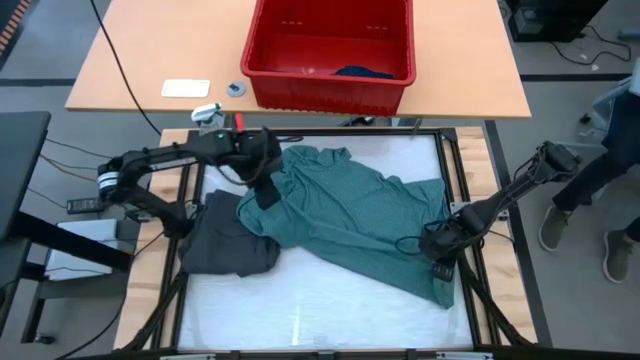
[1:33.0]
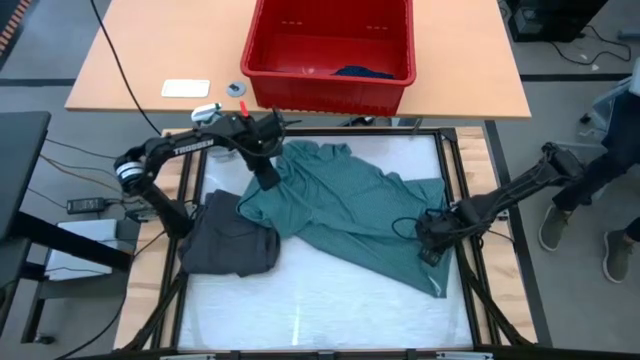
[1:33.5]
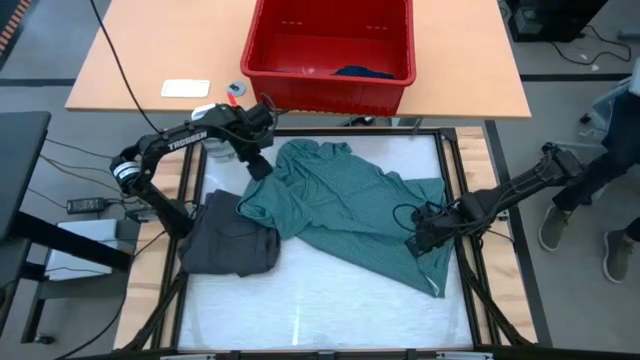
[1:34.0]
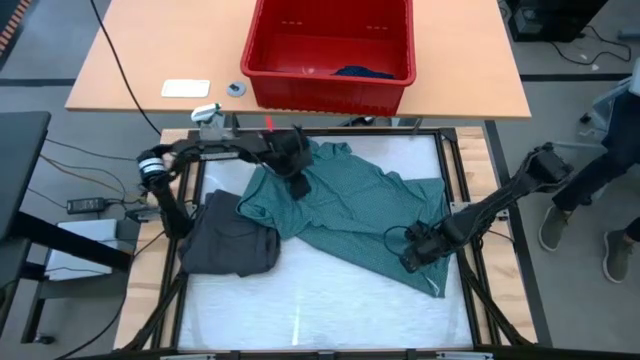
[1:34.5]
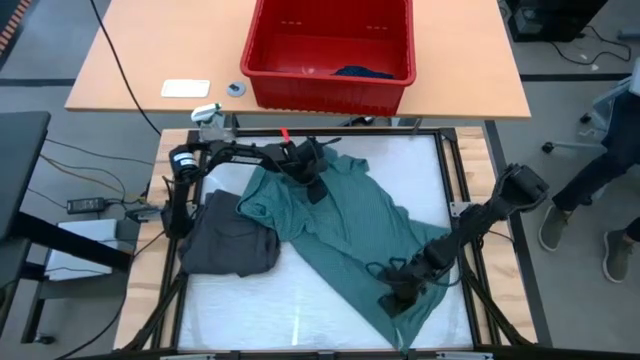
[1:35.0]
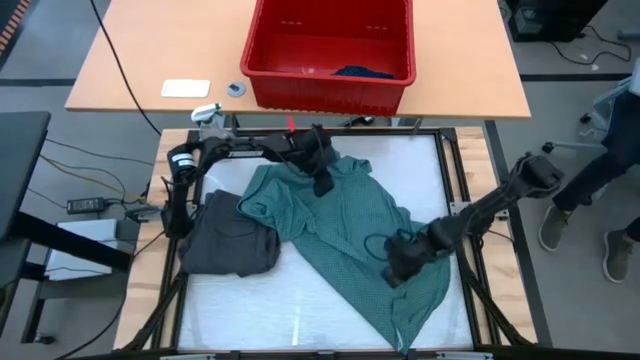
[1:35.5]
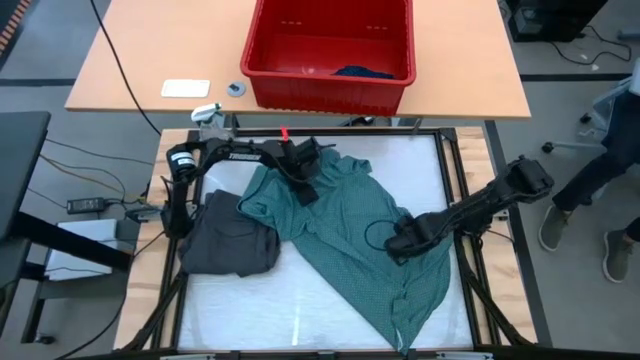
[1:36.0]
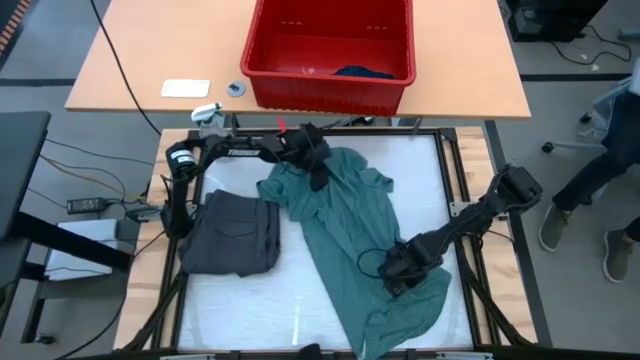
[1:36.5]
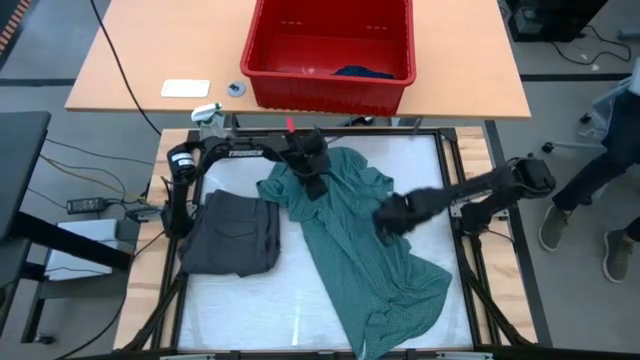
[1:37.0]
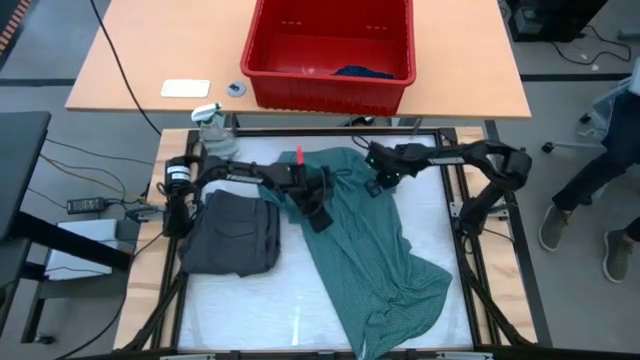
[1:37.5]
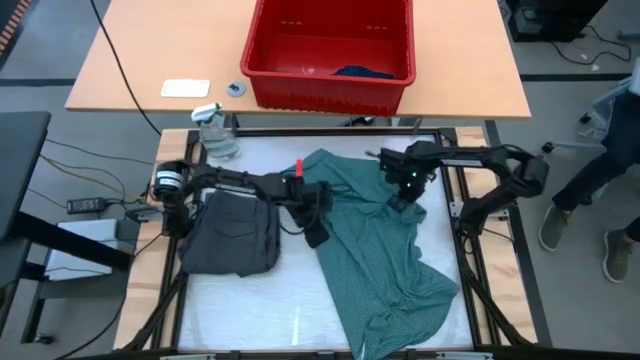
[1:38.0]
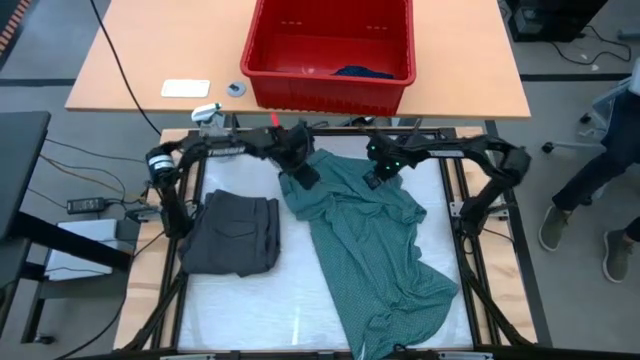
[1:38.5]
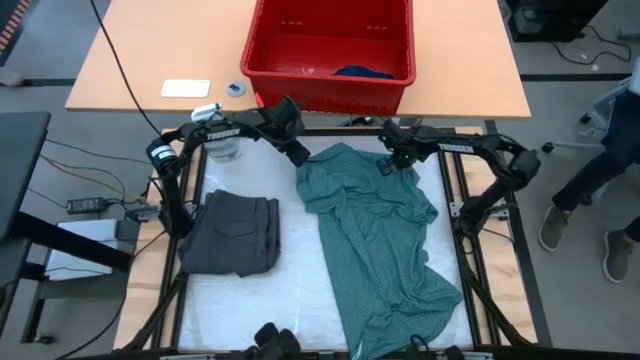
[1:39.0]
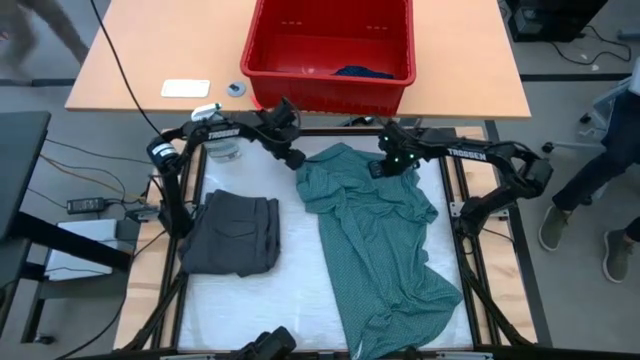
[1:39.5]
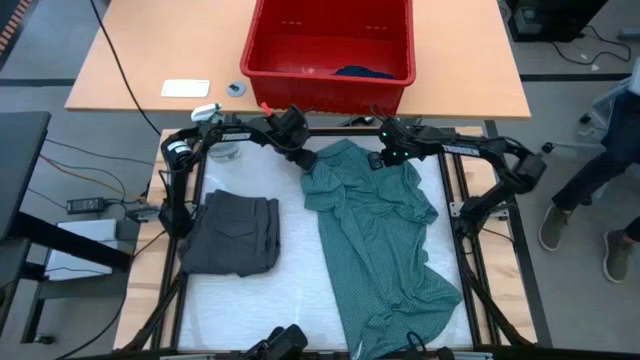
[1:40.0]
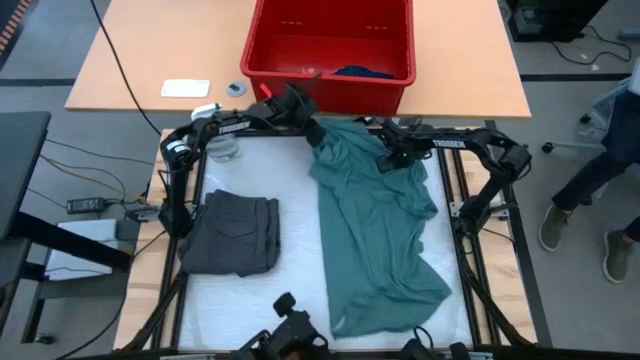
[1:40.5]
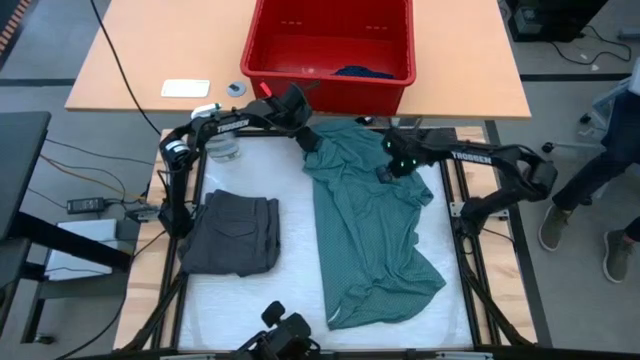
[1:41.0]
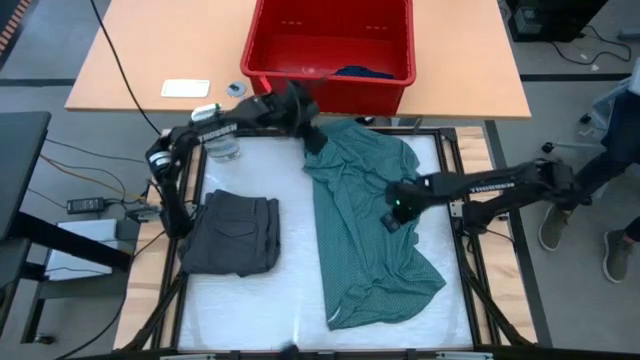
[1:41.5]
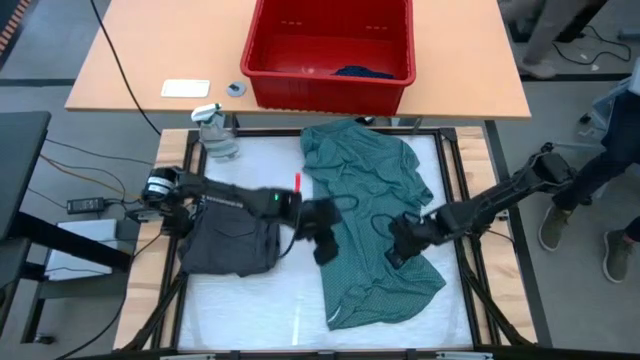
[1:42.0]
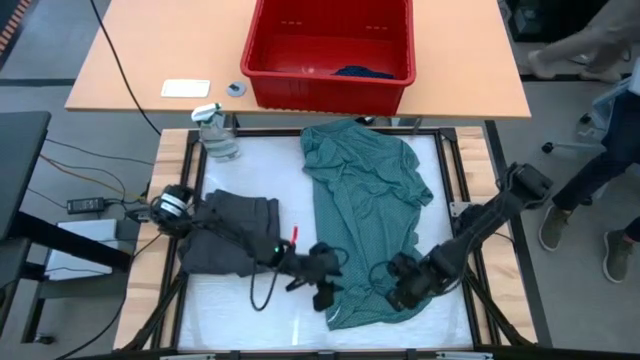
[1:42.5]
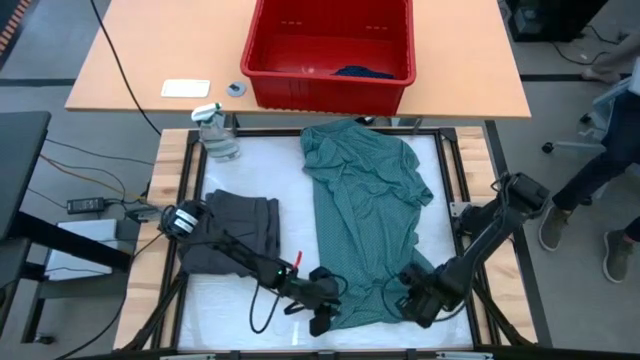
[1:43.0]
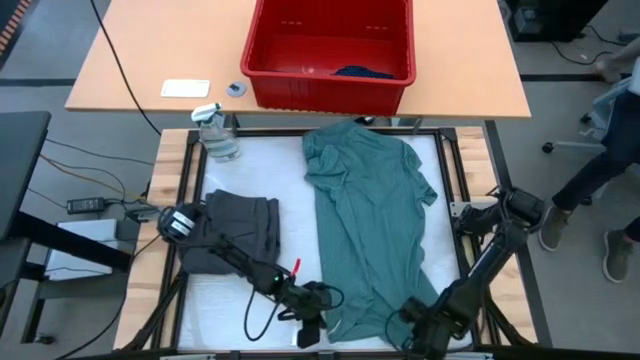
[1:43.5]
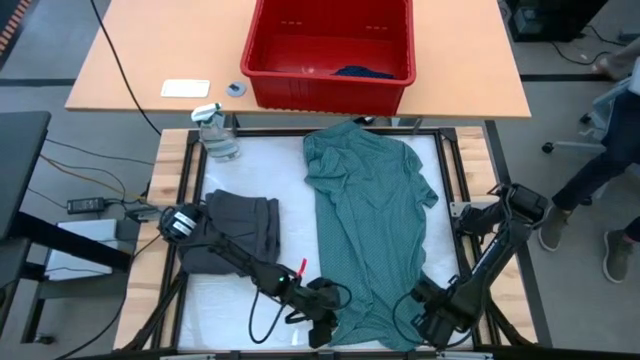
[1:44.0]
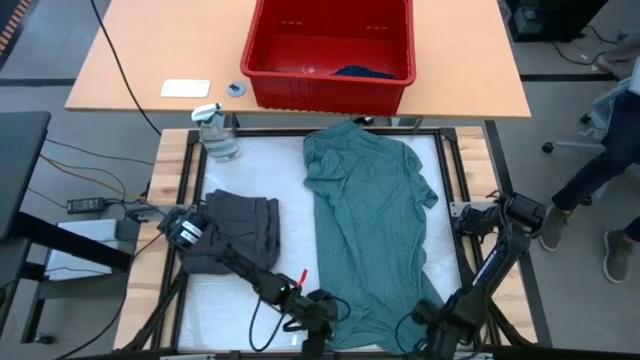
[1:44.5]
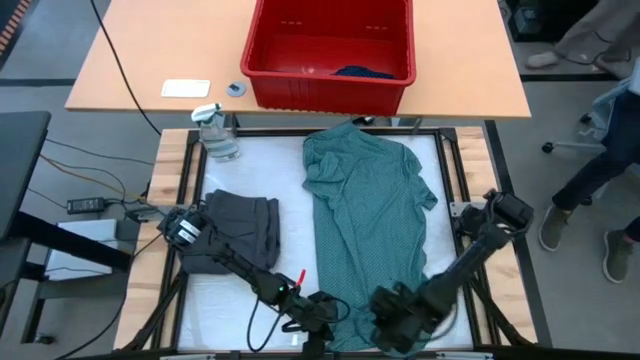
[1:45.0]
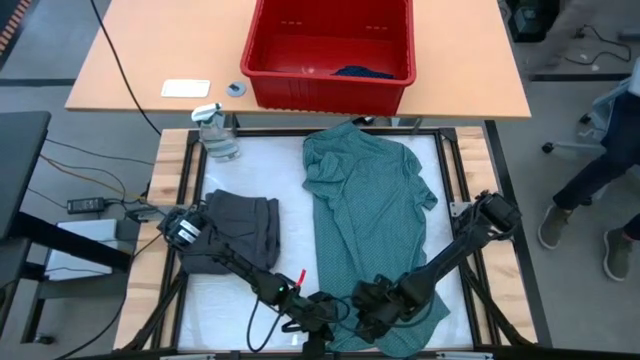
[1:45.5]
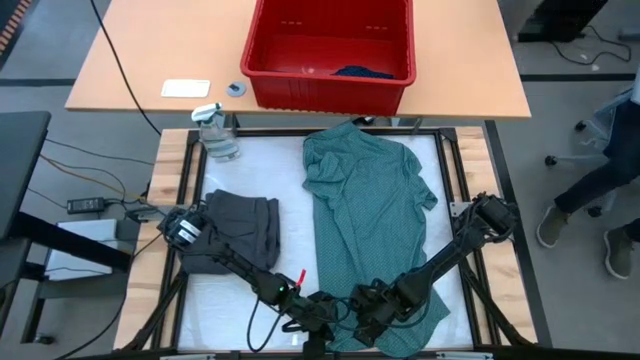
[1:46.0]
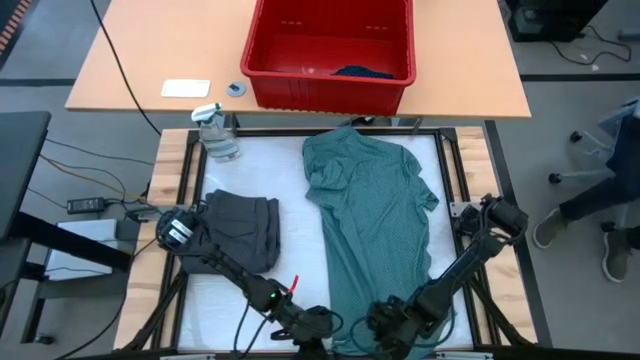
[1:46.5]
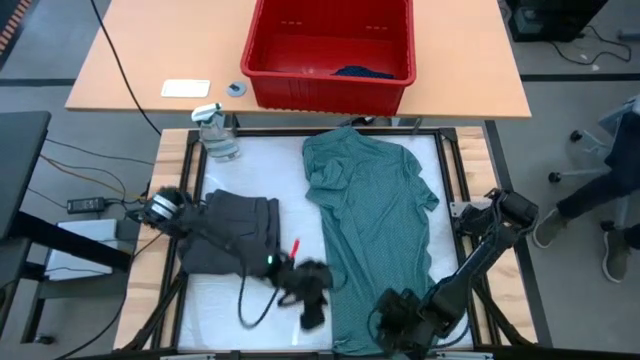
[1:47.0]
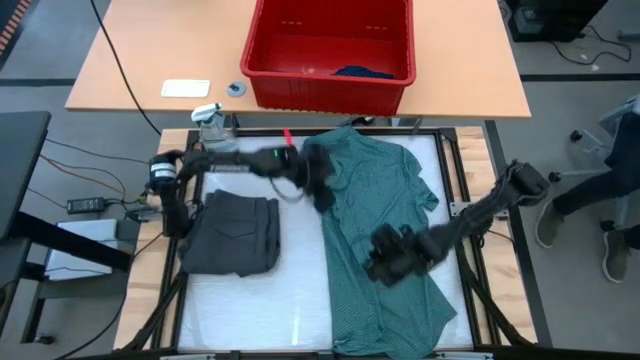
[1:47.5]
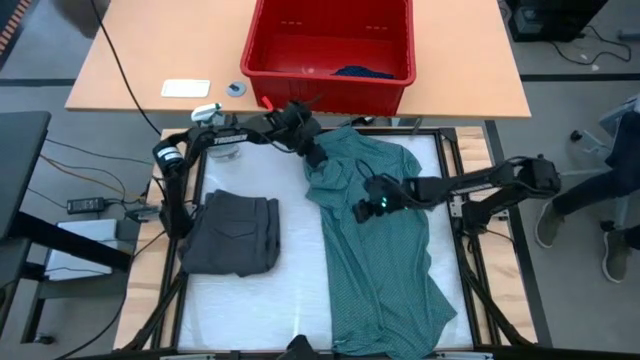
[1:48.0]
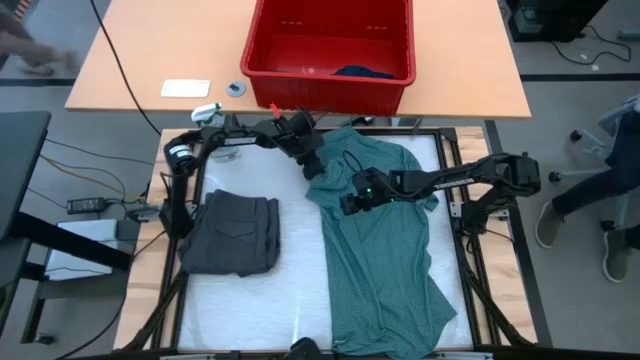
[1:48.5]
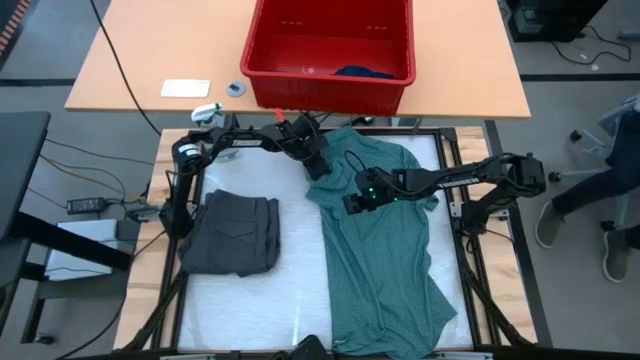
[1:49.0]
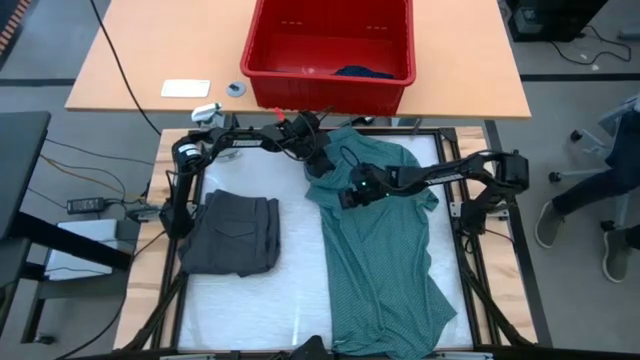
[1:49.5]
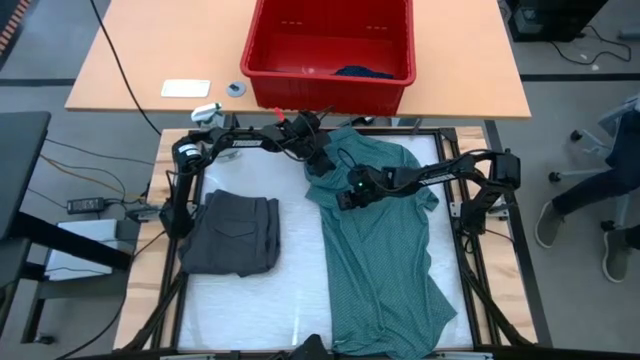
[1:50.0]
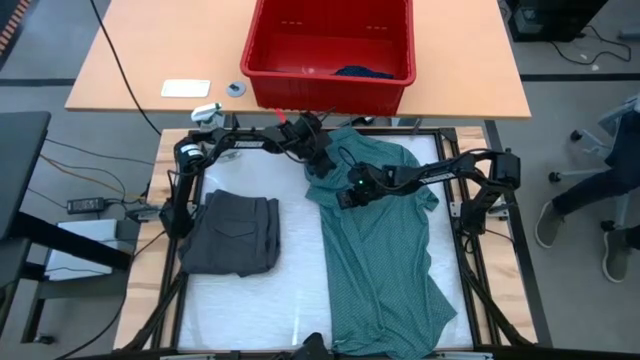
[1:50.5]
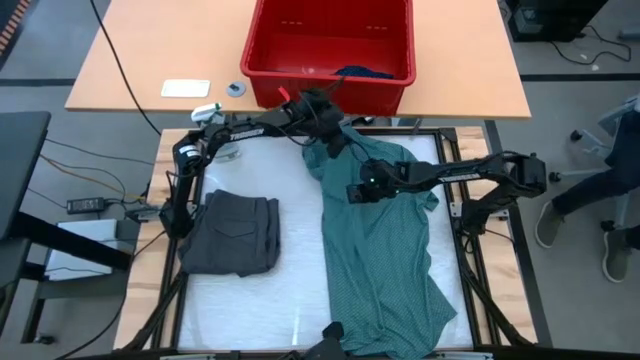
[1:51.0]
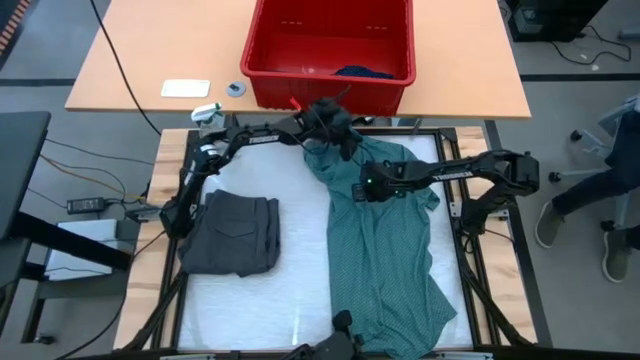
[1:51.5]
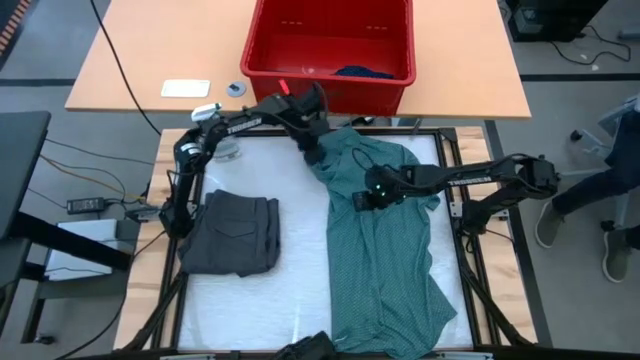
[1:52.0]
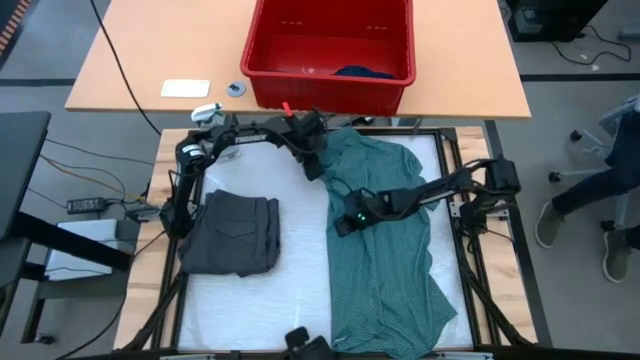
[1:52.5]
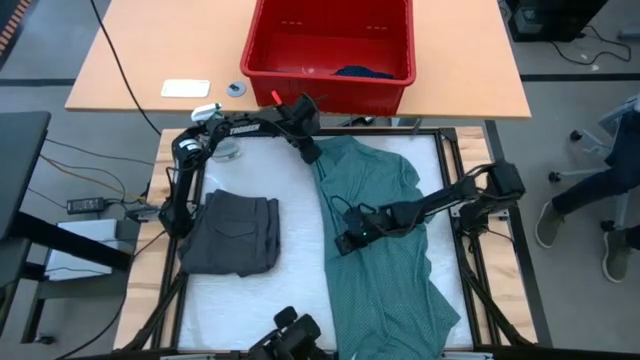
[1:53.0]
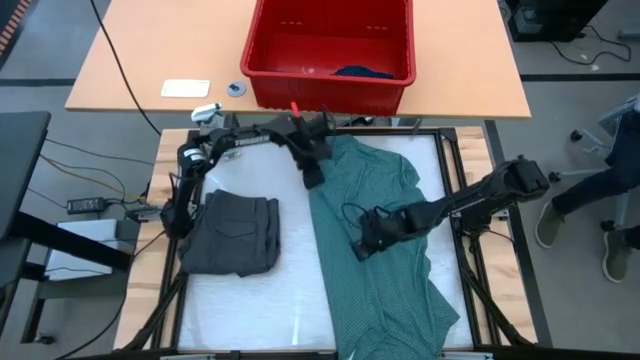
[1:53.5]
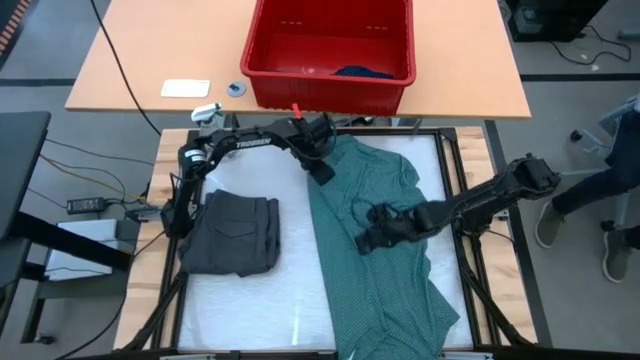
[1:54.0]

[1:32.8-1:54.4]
Task: Fold Laundry from Bin
Fold the green polo shirt on the table
